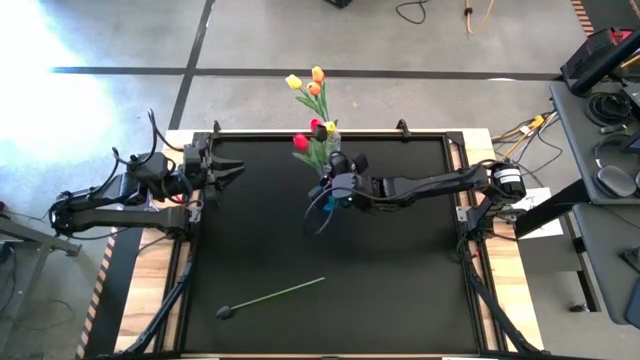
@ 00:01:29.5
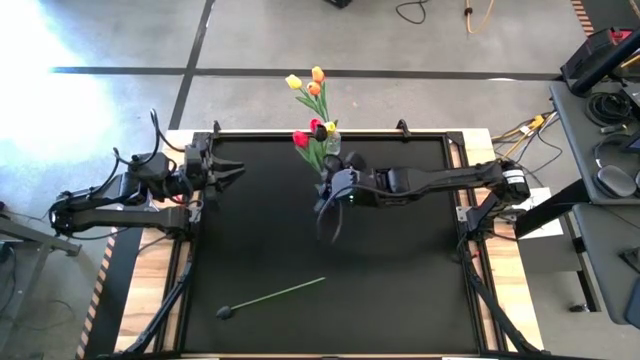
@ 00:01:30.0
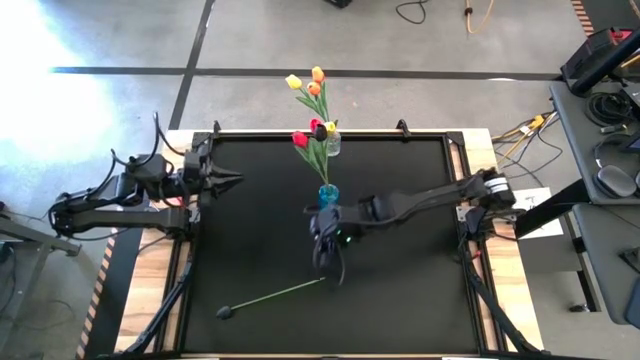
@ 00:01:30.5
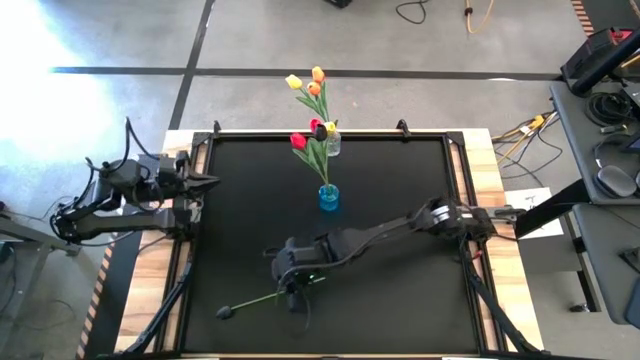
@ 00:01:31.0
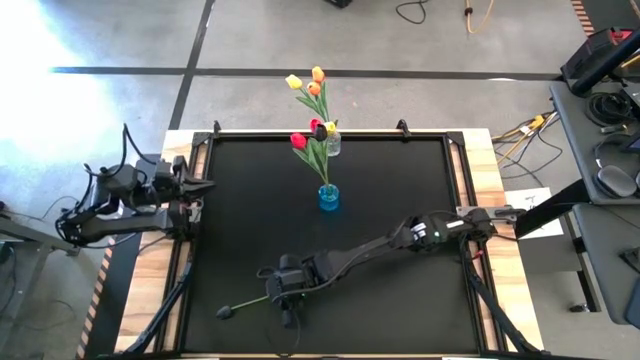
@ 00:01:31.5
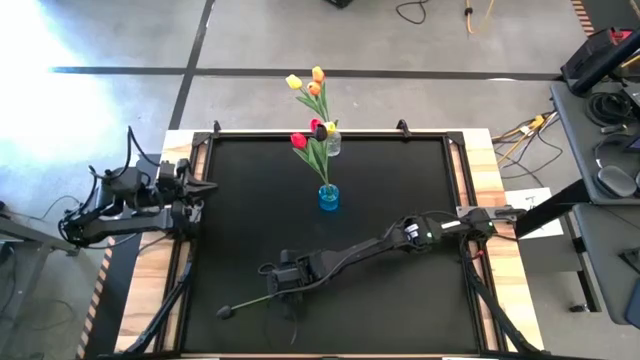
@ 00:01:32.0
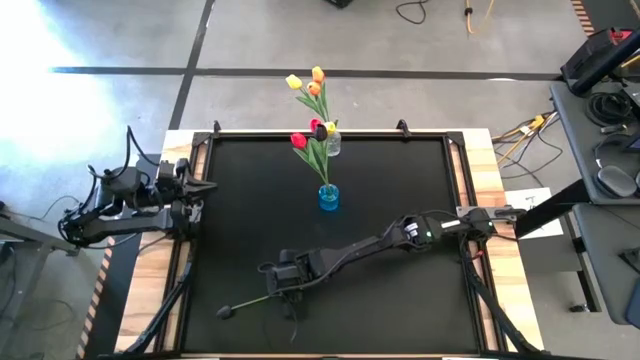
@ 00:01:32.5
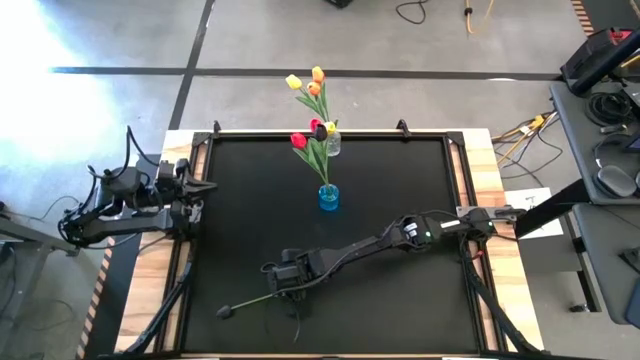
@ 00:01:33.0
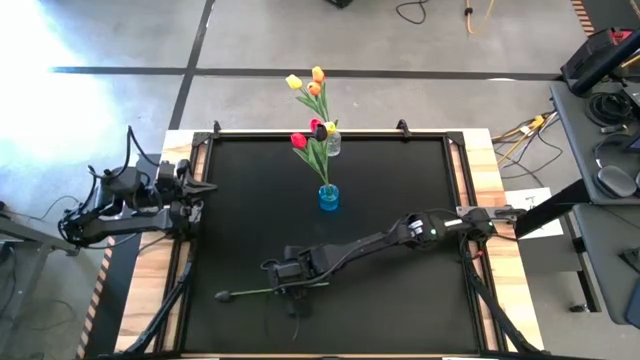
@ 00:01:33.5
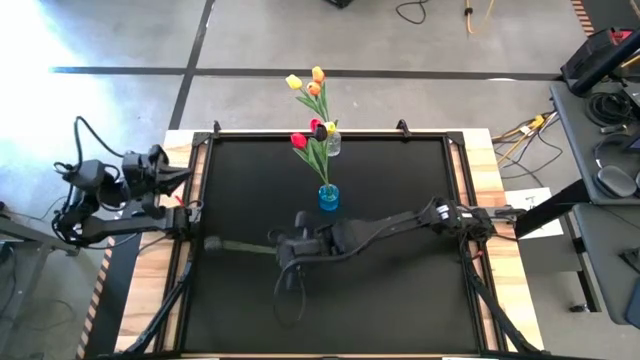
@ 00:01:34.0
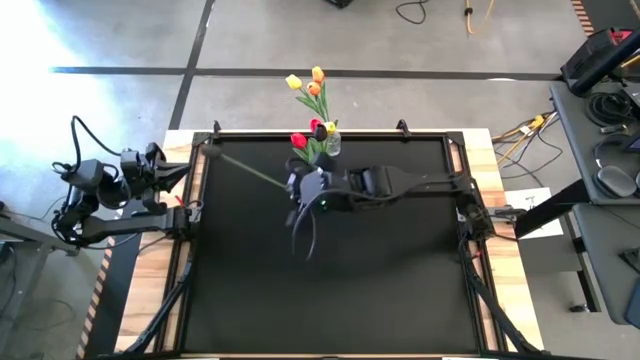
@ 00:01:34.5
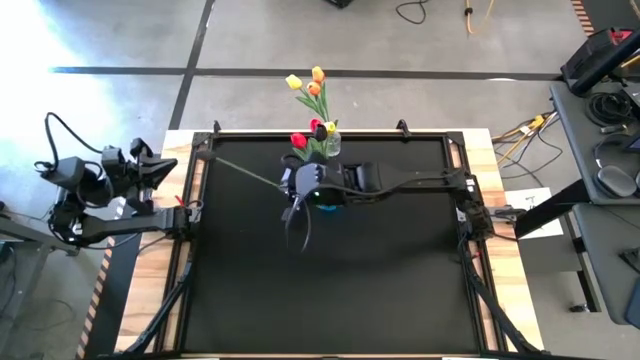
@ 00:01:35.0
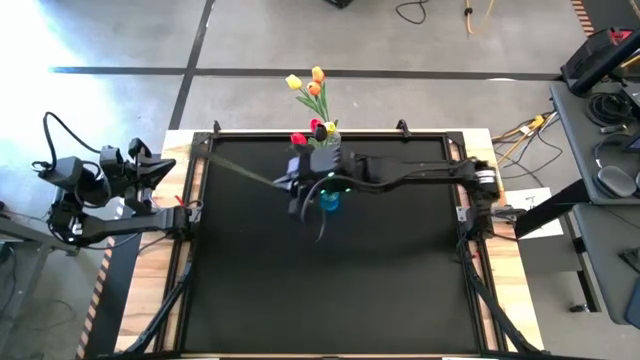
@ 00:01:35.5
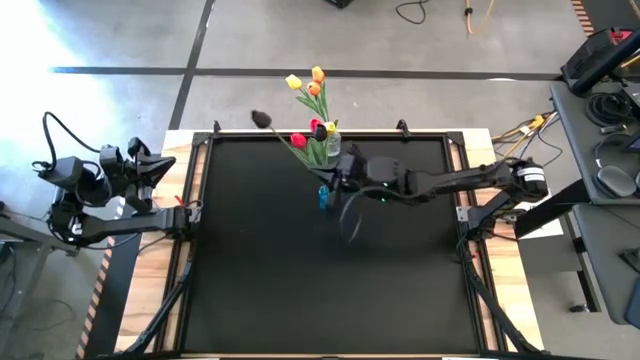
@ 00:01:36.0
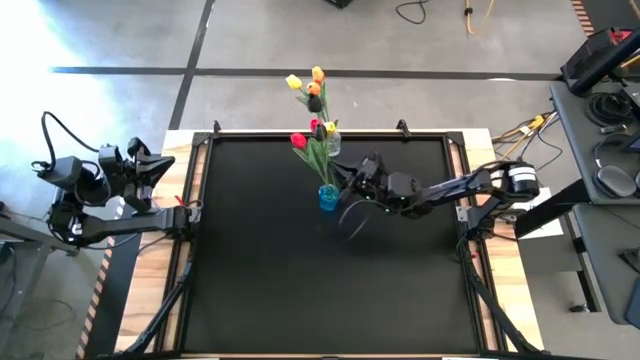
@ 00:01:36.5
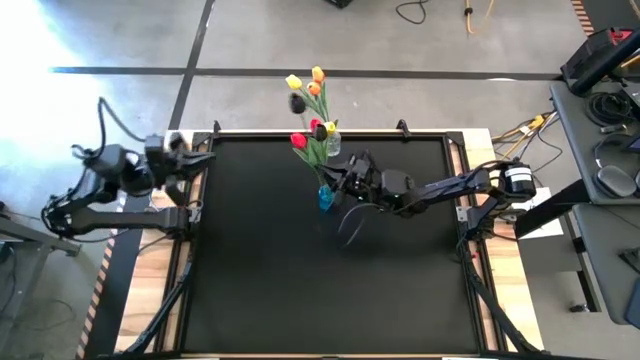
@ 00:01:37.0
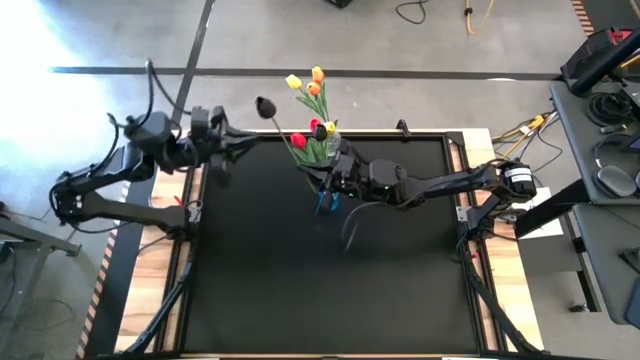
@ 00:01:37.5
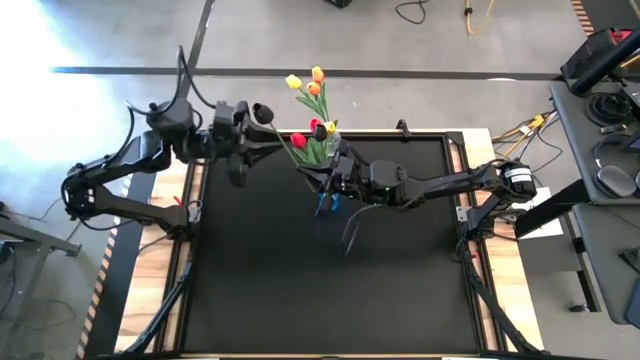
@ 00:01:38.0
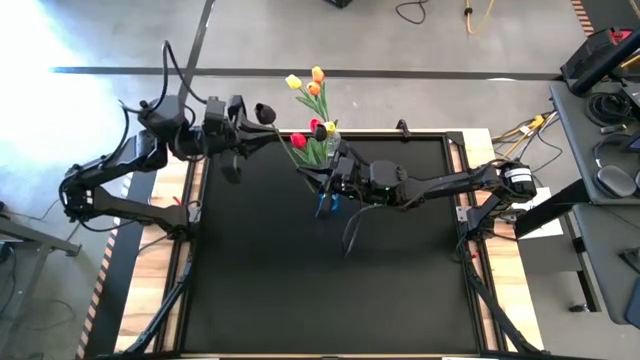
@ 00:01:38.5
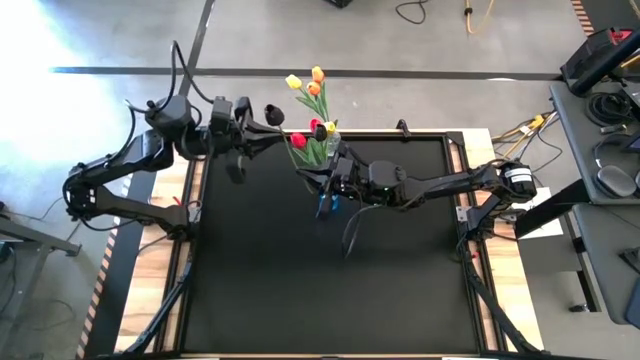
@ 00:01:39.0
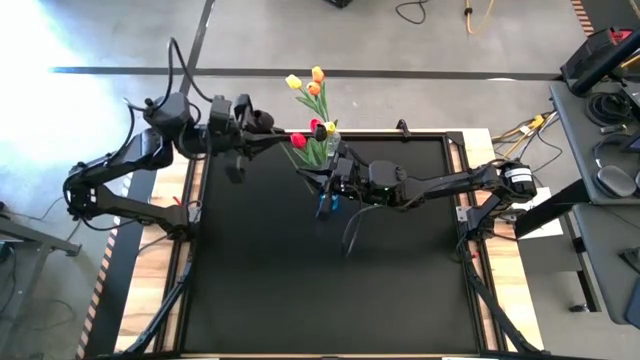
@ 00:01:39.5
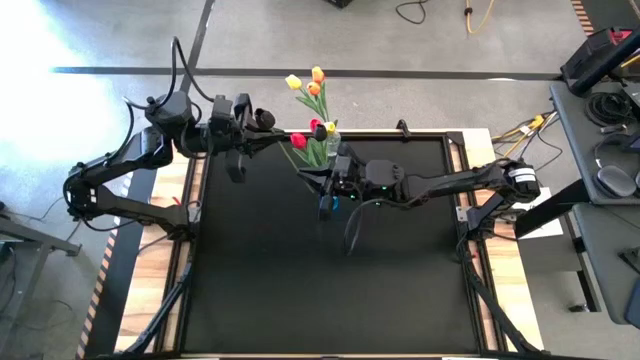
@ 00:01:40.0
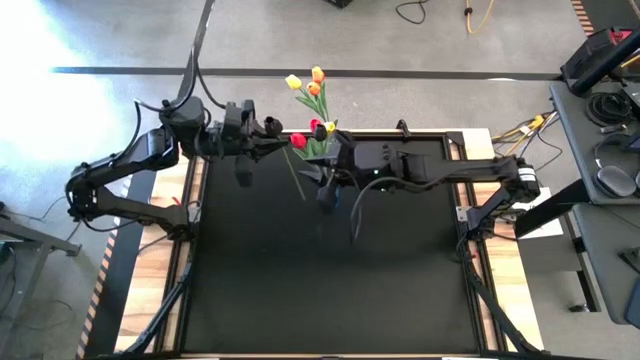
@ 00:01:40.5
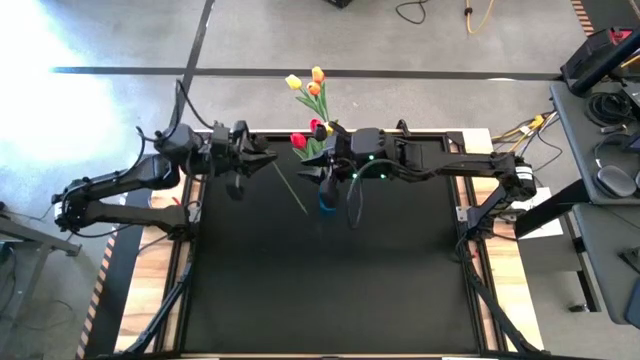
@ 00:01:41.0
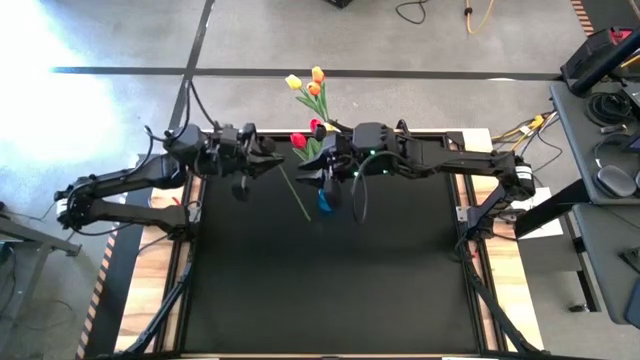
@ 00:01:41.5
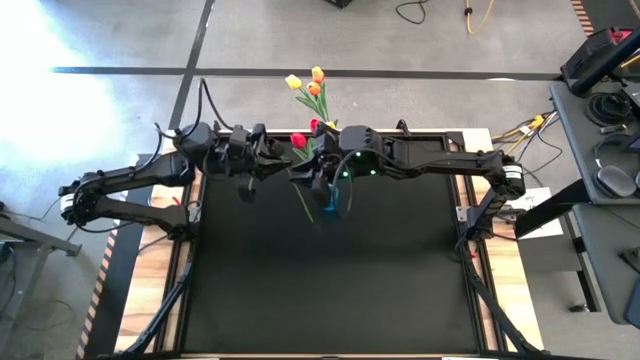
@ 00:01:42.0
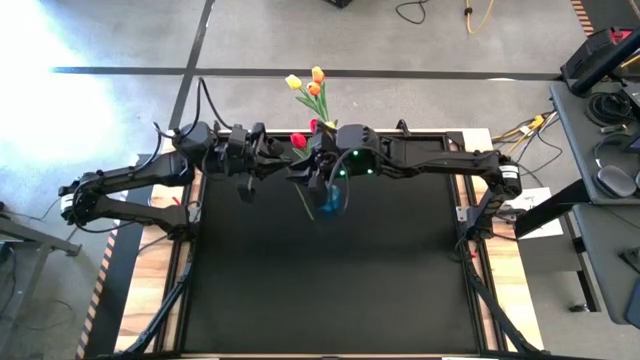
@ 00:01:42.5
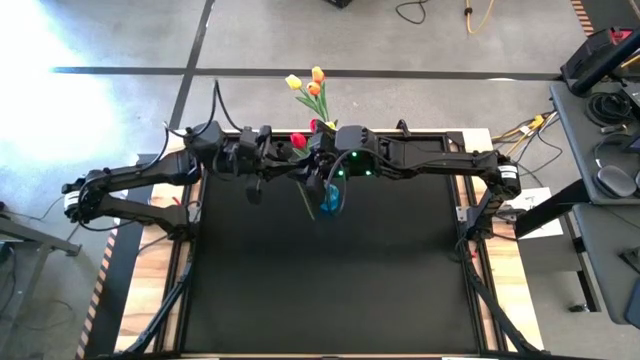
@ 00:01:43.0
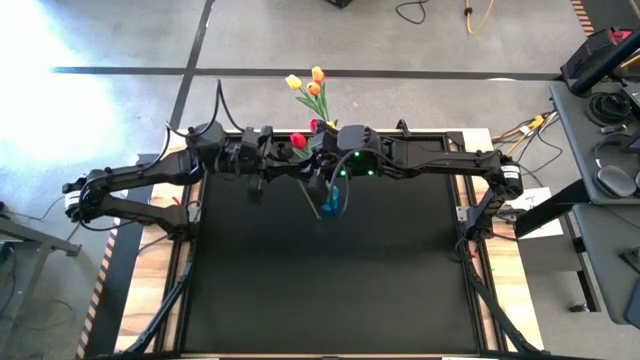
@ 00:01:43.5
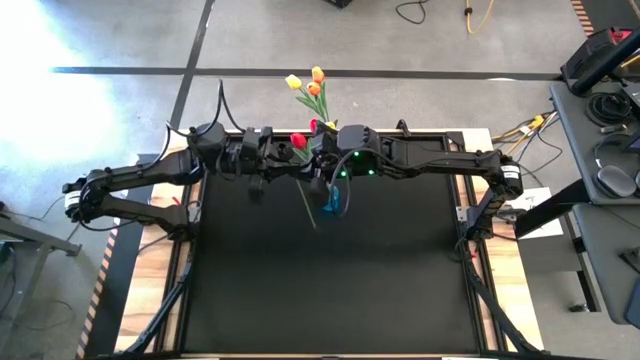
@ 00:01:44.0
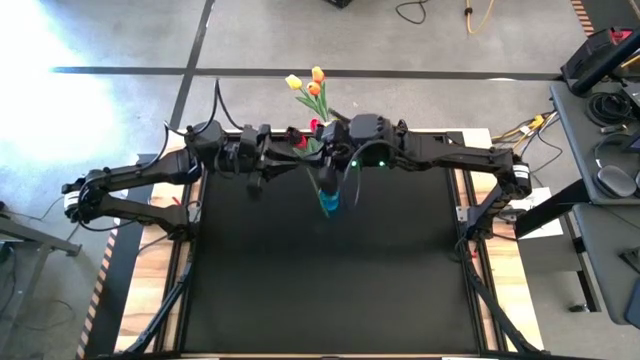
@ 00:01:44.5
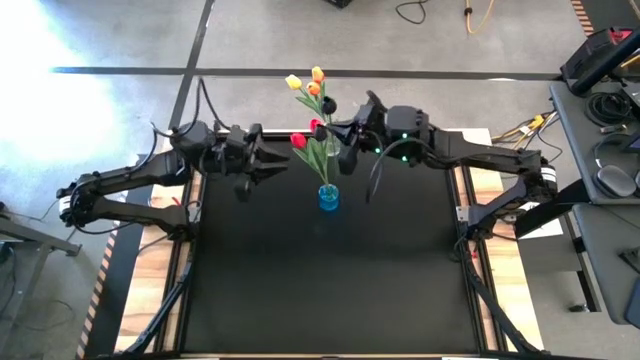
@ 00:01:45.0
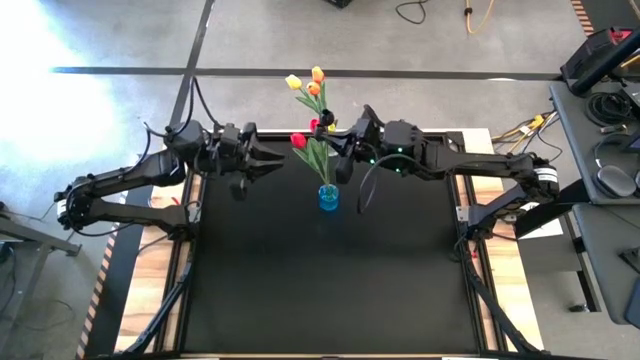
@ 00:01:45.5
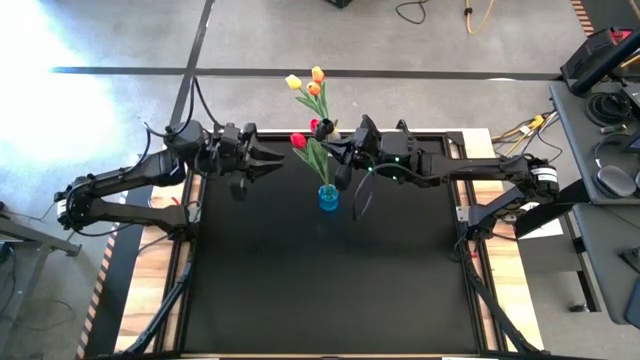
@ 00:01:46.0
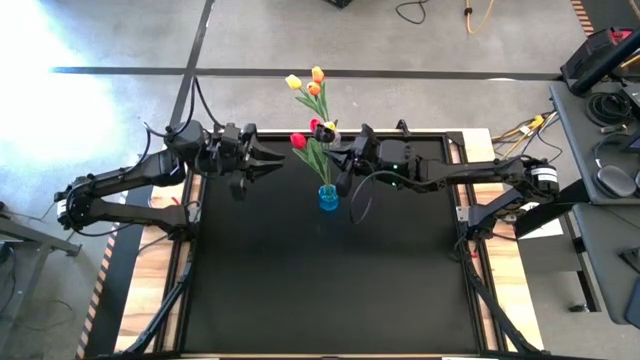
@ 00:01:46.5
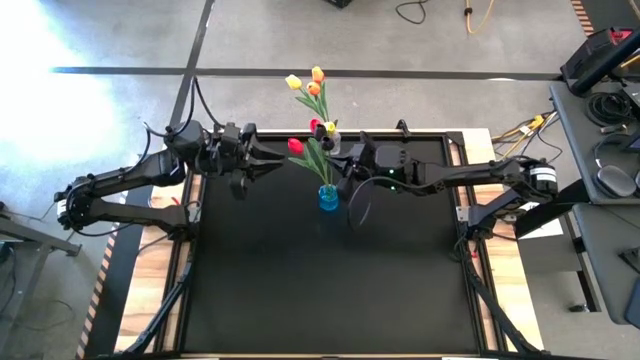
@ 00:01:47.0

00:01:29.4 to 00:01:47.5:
Task: Sort flowers into vase by color
Put the black tulip flower into the blue vase

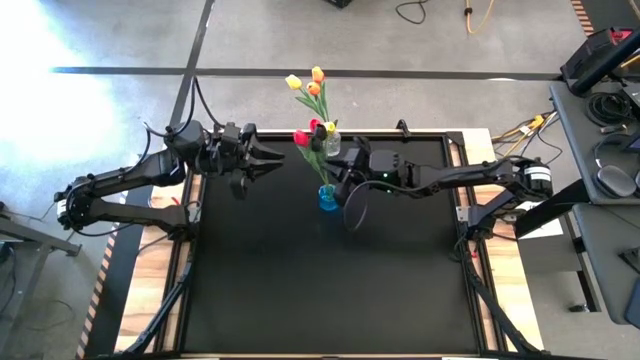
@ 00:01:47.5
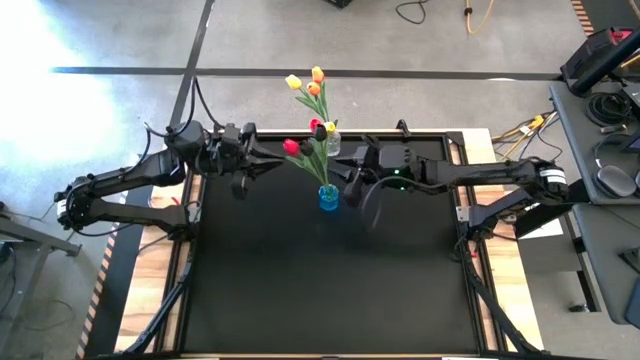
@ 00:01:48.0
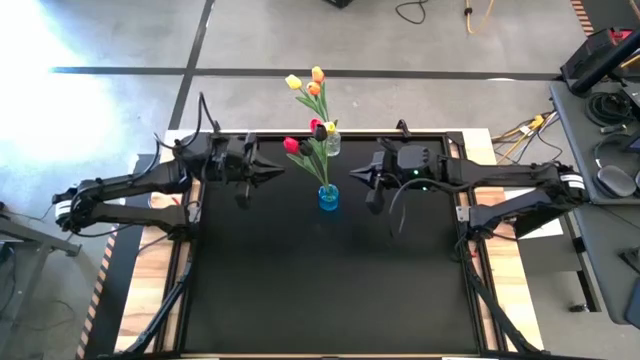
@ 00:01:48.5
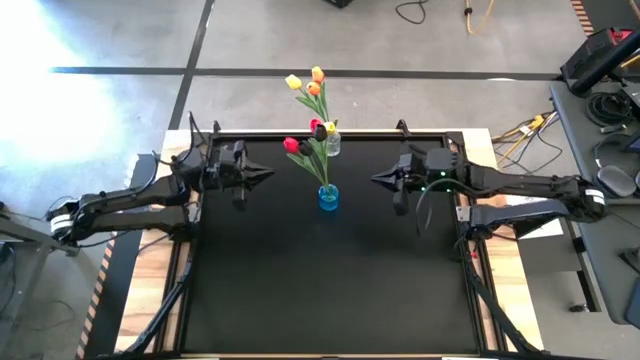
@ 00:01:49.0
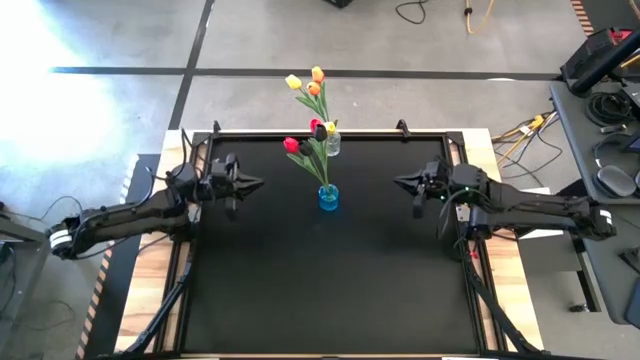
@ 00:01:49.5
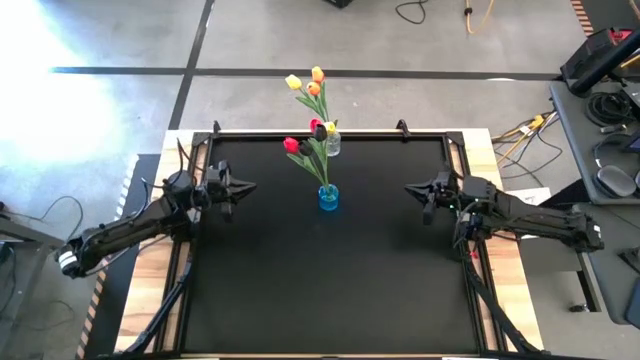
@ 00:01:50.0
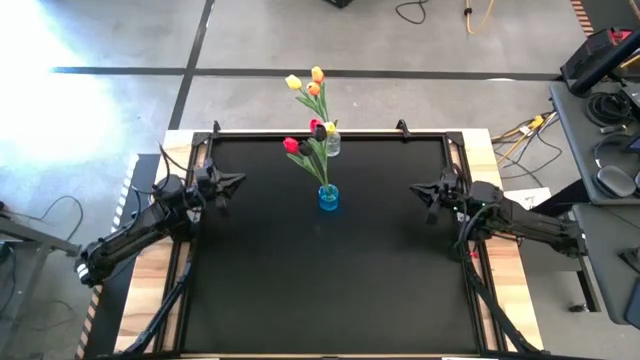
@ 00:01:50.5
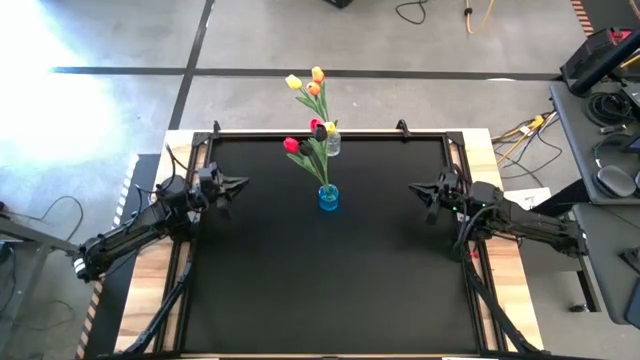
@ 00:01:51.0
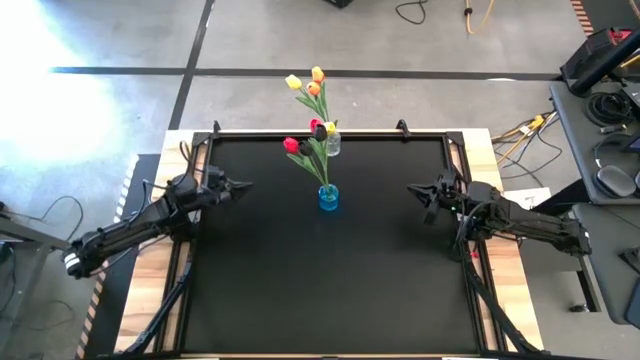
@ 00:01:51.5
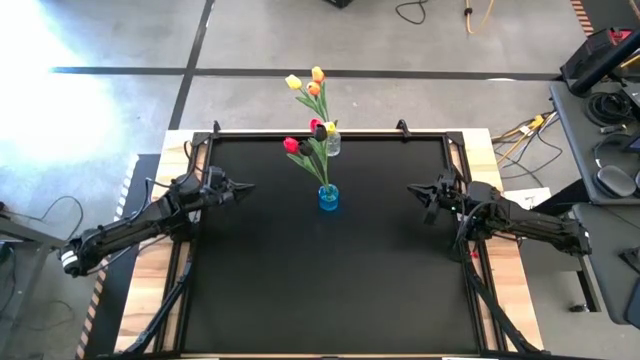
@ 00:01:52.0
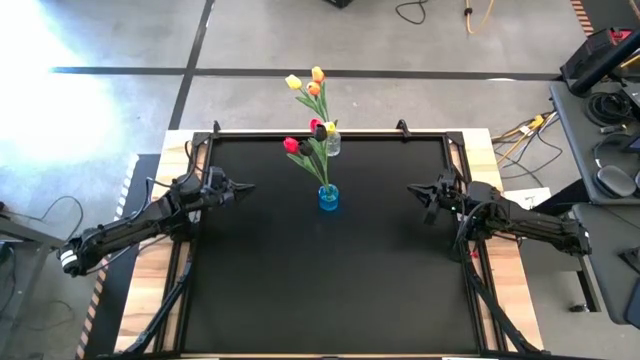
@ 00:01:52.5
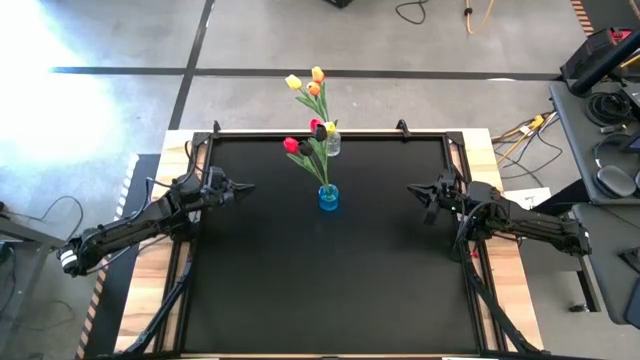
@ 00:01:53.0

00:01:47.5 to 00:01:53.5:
Return to Home Position
